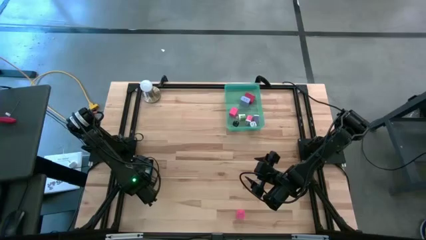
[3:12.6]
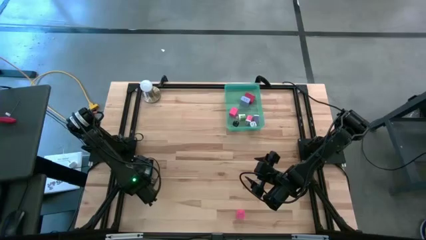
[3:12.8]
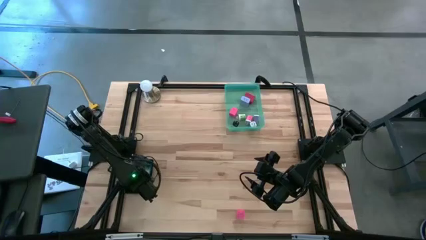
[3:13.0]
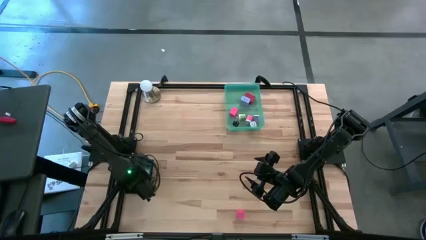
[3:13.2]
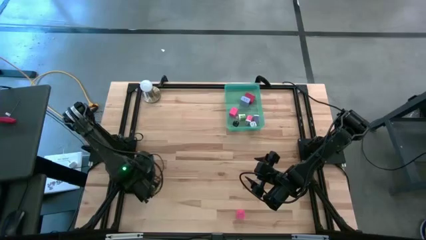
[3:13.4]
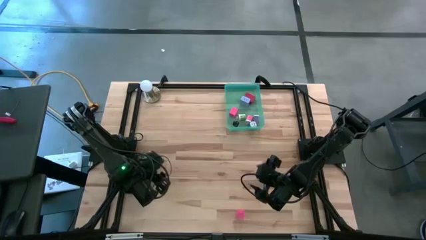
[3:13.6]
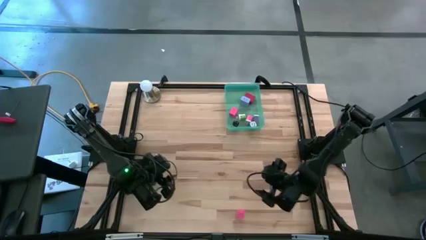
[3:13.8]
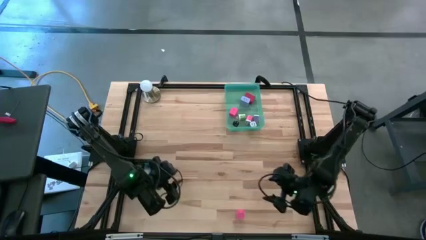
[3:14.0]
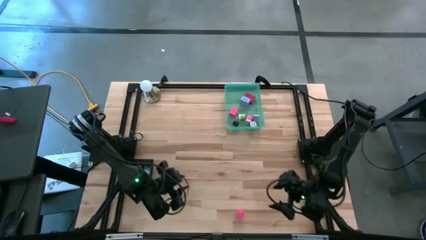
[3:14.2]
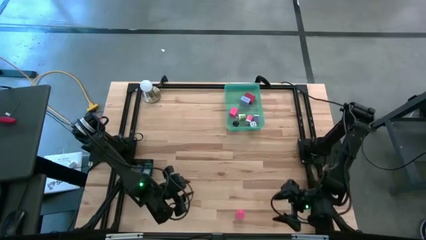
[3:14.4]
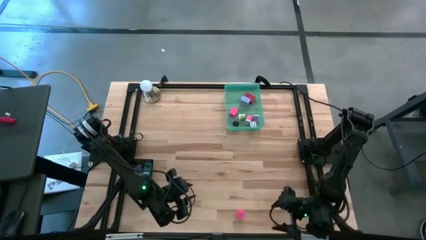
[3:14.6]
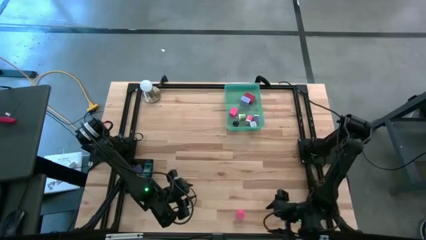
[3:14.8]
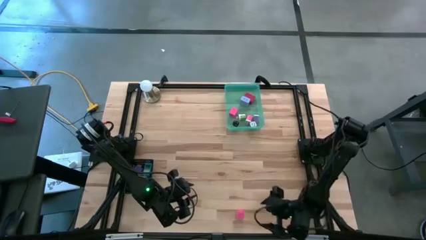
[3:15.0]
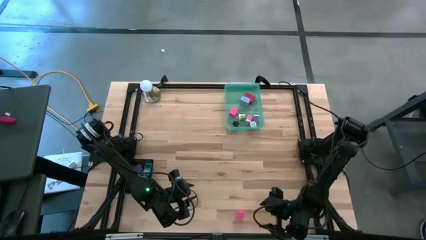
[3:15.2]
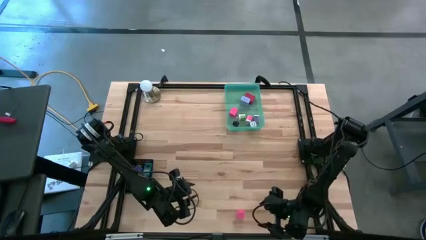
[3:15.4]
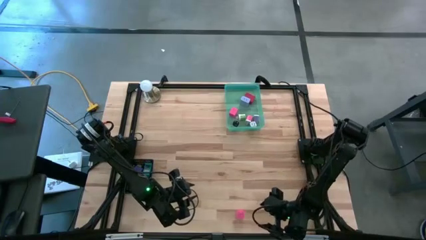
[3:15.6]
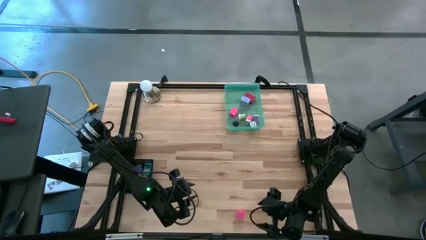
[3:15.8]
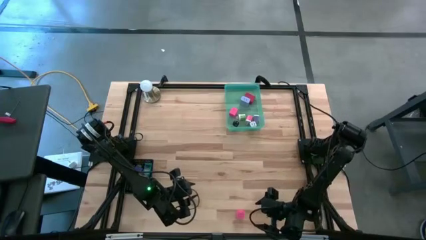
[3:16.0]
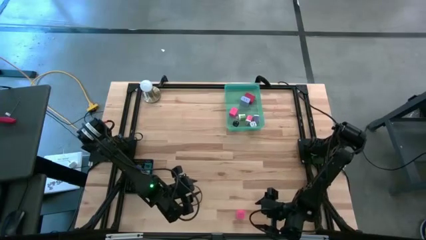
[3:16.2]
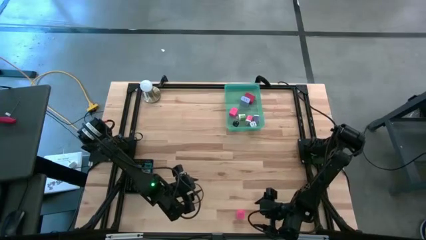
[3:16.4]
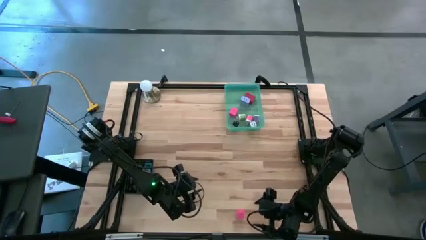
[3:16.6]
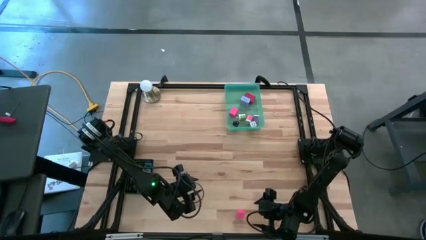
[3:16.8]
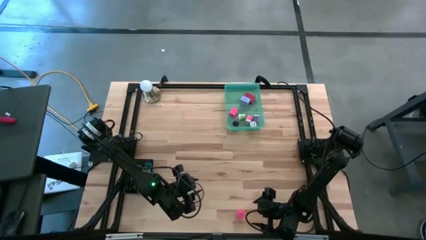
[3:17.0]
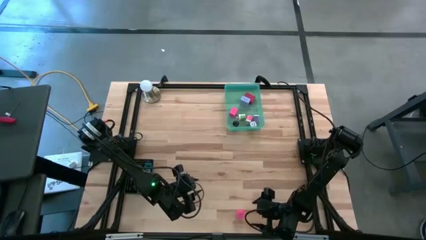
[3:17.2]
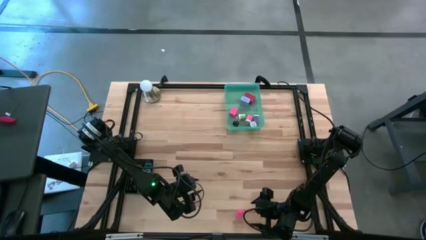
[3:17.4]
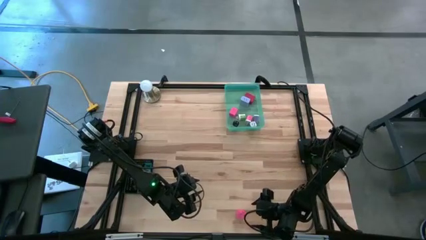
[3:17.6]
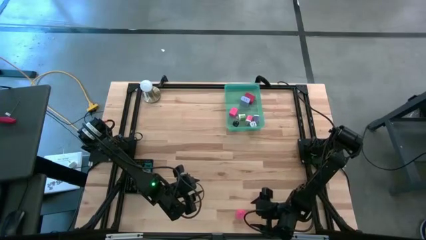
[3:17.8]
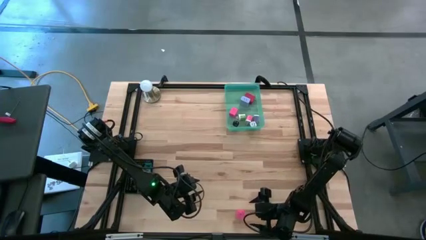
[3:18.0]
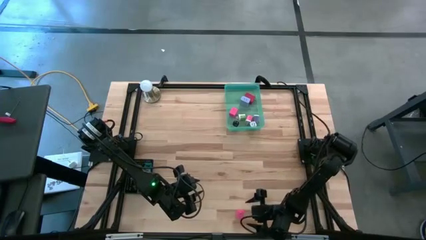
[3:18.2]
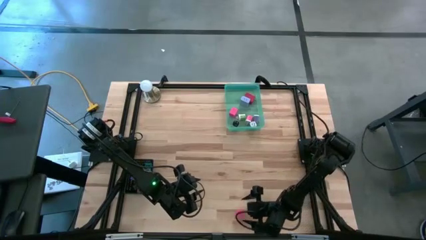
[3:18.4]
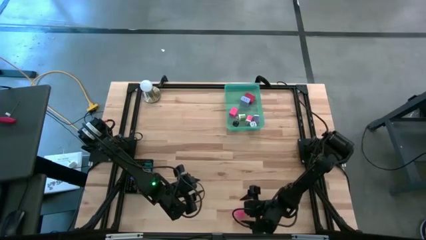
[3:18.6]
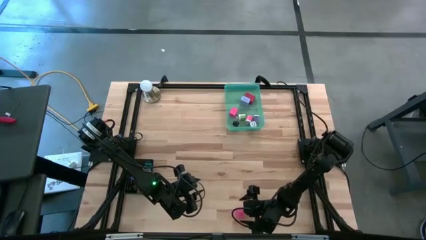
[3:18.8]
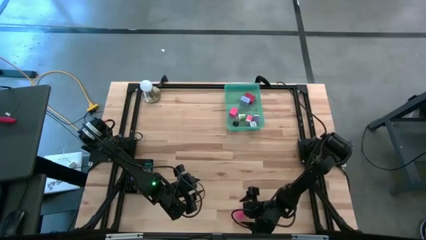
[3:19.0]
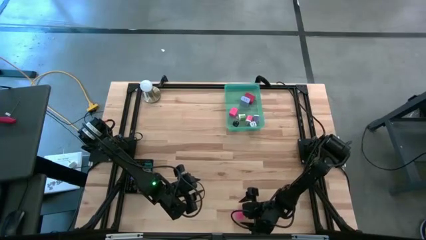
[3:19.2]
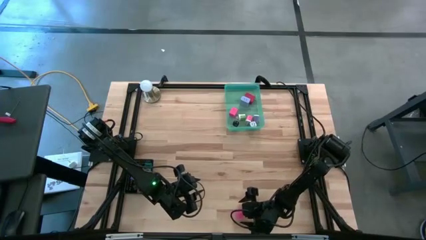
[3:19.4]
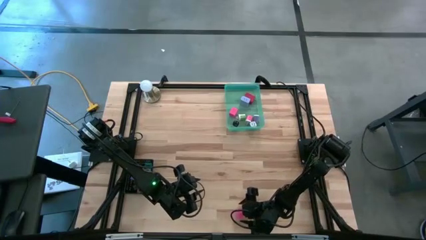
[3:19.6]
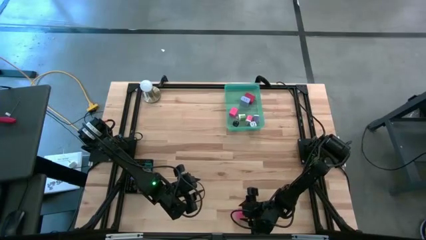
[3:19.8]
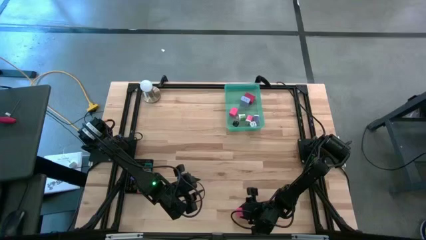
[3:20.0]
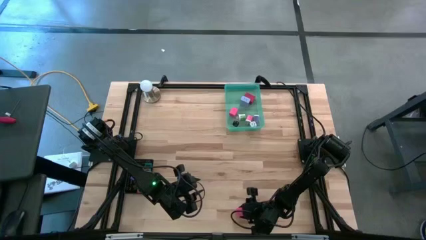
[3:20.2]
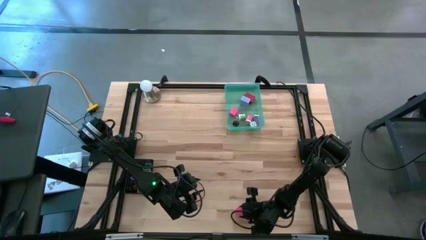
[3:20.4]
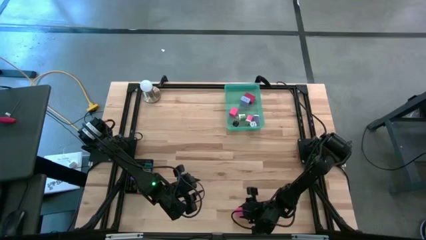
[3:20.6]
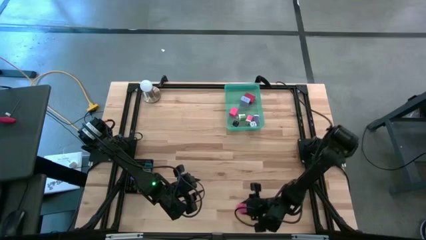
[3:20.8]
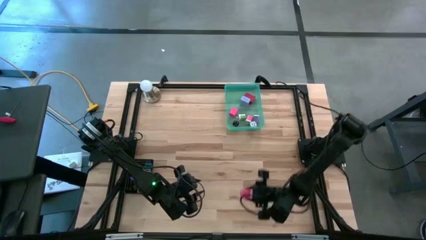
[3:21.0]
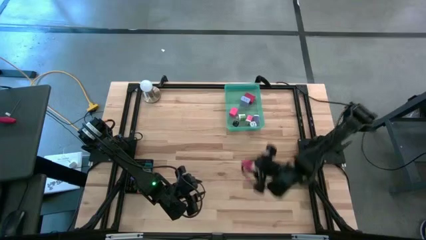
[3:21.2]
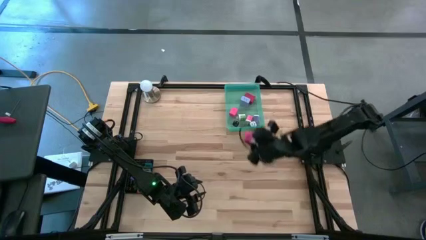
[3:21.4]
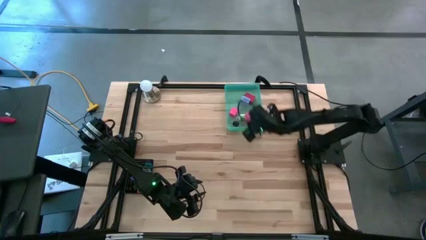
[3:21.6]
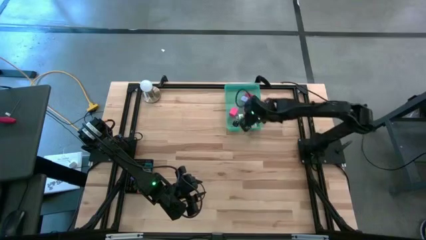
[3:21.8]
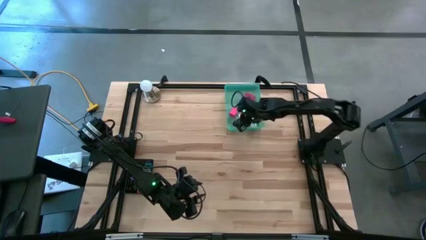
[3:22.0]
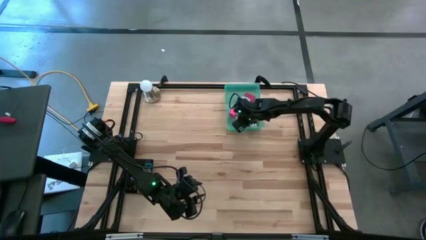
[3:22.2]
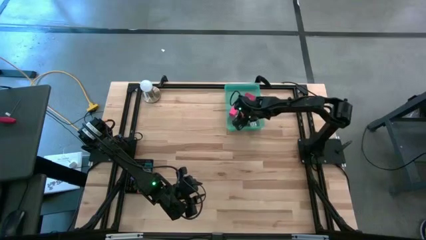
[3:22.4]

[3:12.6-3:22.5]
Task: Pick & Place Office items
Put the pink charger adapter into the green bin

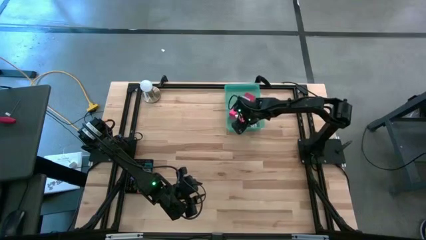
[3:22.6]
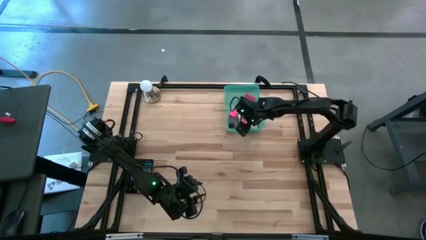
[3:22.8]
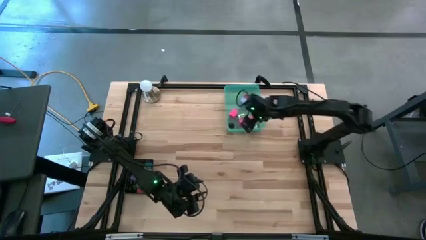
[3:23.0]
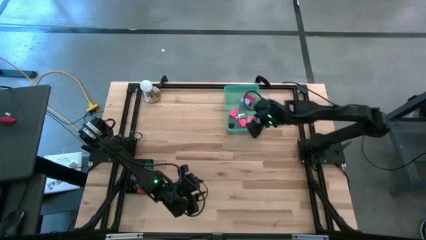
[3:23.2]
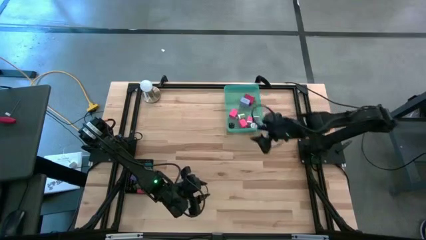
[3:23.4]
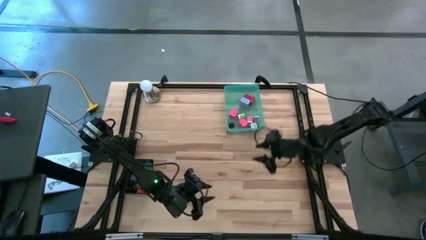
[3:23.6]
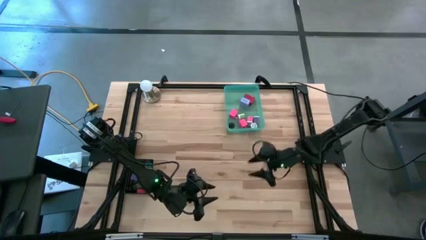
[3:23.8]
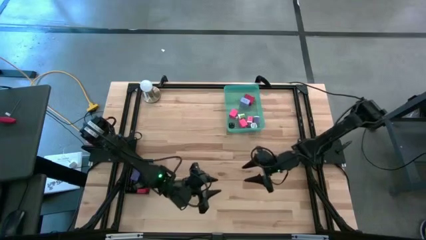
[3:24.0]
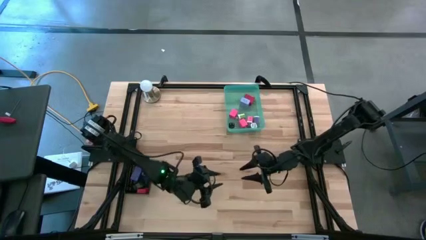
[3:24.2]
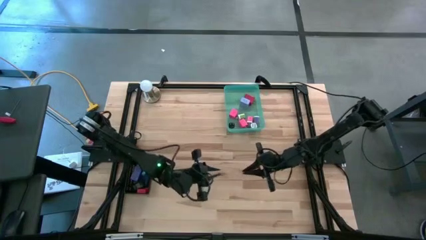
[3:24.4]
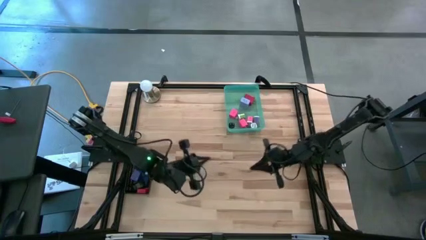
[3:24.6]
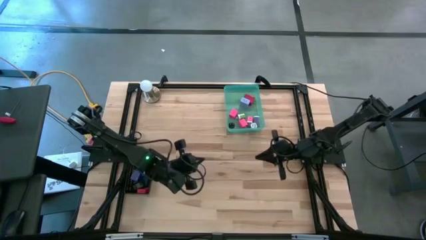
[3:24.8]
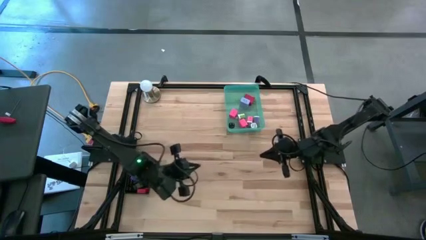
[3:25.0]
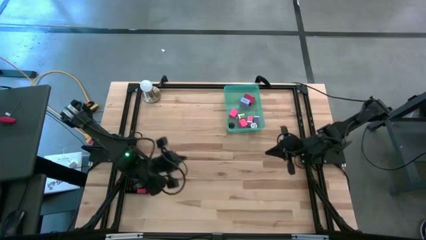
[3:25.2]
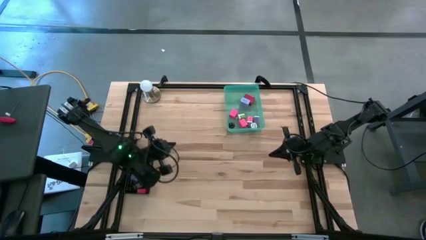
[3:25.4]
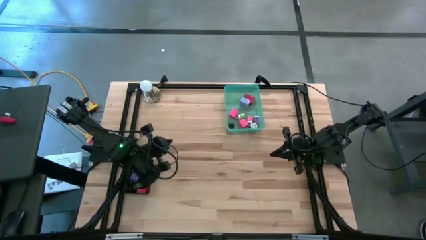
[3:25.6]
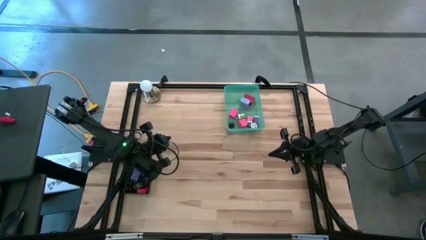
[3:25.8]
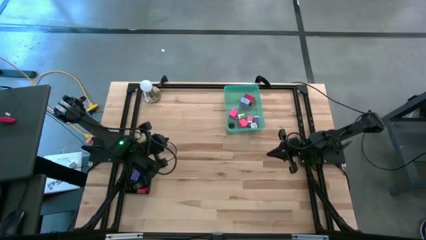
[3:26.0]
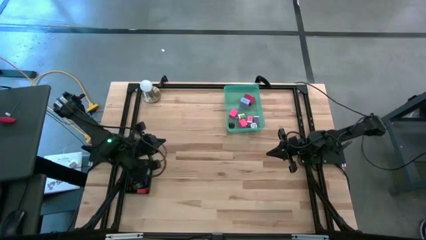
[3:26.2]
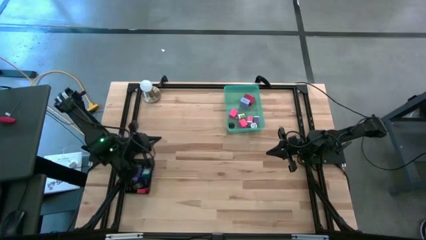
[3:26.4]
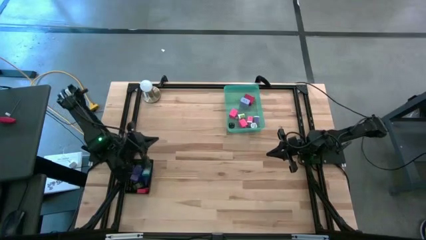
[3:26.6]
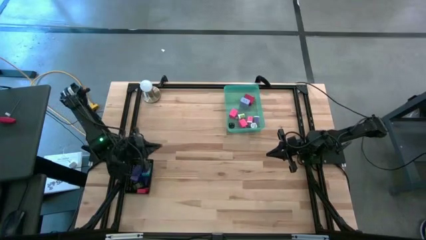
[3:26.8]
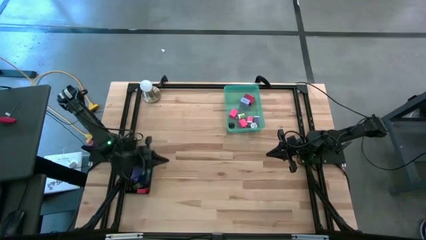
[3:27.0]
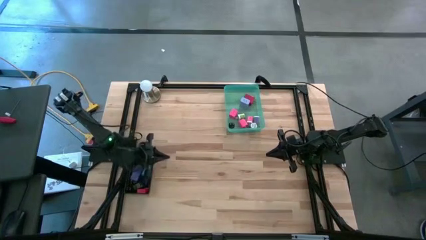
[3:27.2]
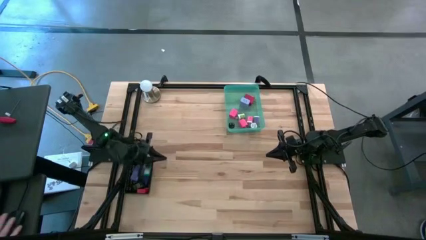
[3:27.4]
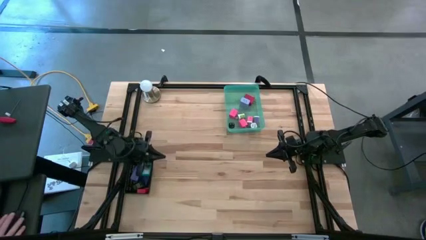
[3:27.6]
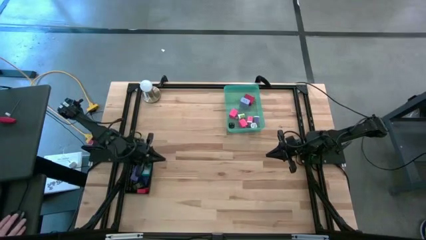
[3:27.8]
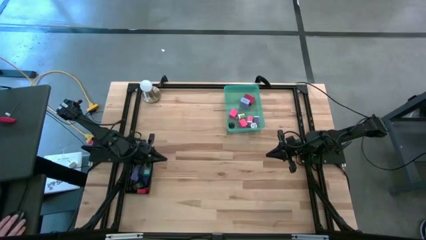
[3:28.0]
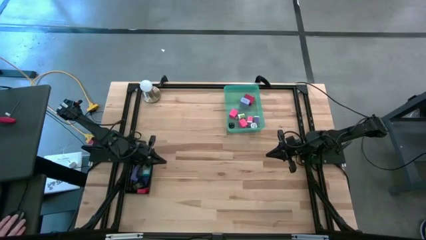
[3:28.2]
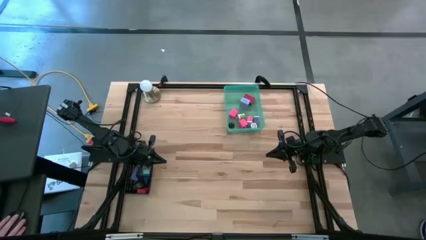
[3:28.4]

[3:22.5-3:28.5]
Return to Home Position
